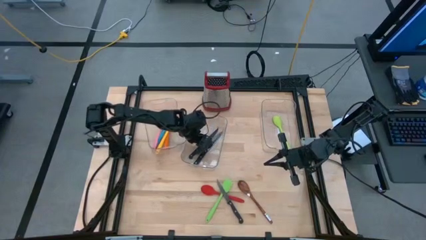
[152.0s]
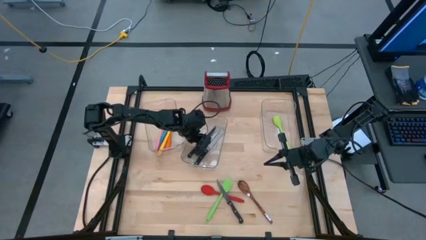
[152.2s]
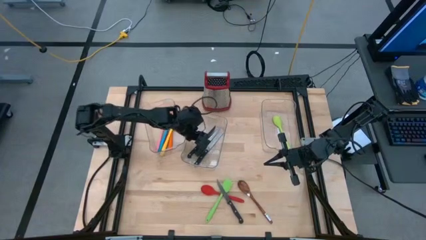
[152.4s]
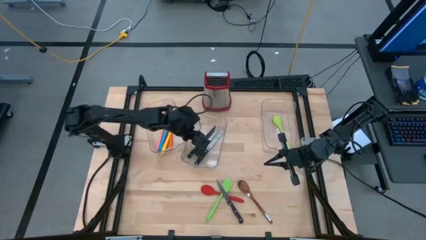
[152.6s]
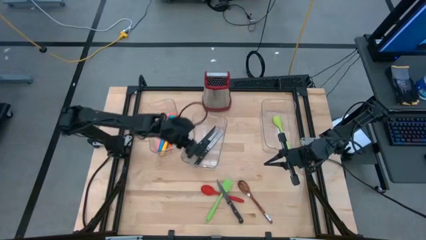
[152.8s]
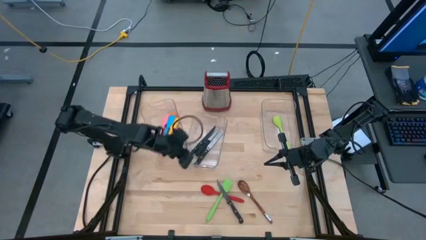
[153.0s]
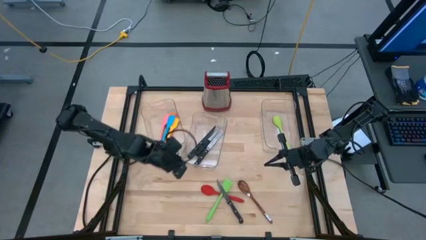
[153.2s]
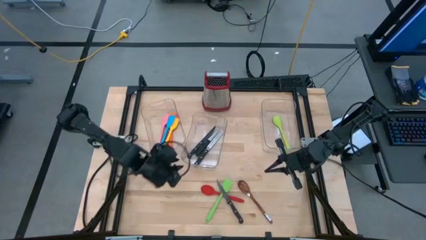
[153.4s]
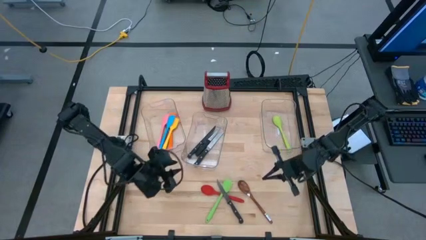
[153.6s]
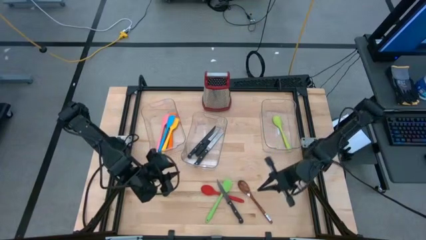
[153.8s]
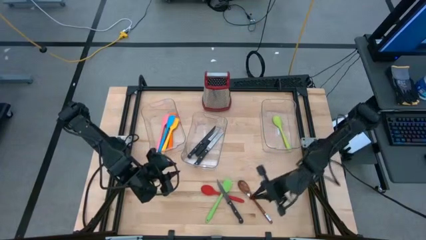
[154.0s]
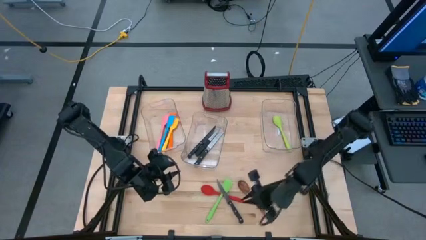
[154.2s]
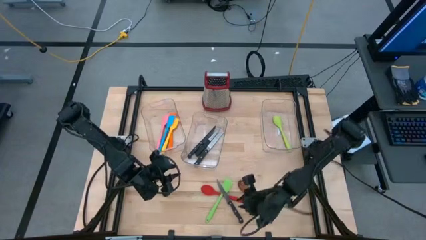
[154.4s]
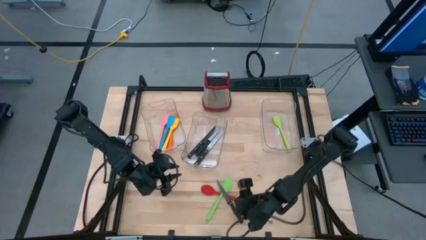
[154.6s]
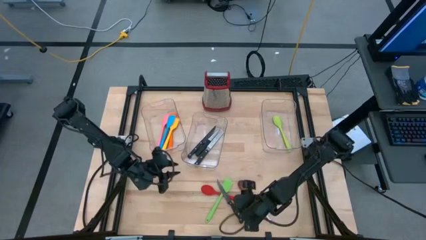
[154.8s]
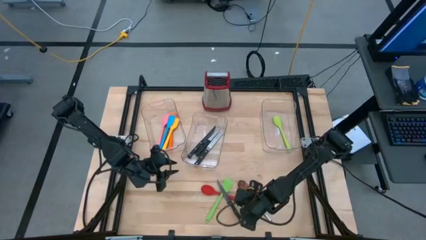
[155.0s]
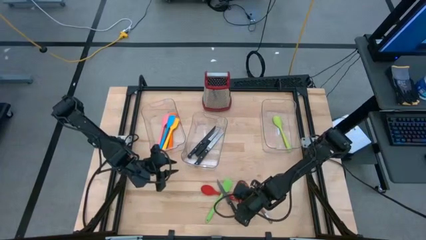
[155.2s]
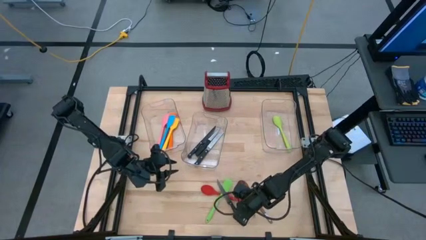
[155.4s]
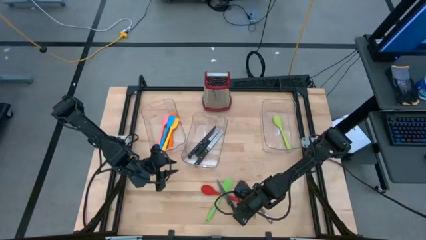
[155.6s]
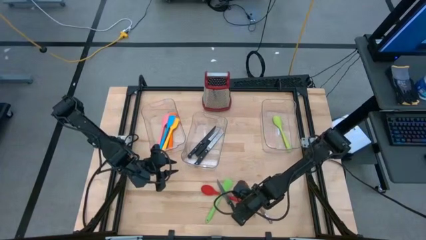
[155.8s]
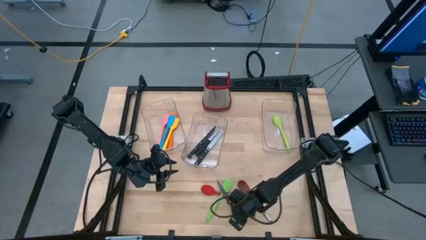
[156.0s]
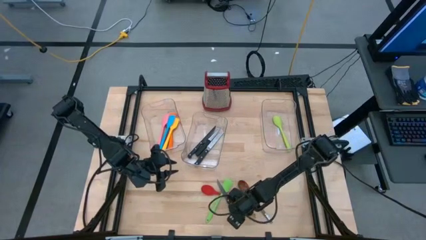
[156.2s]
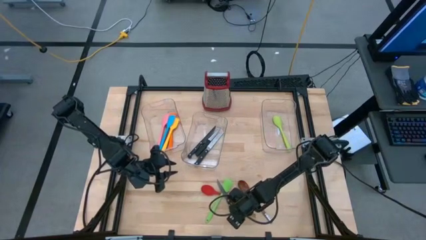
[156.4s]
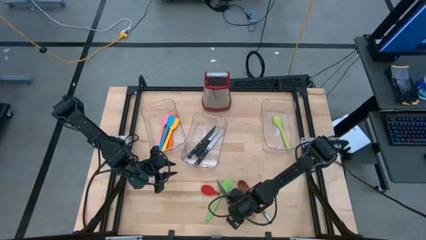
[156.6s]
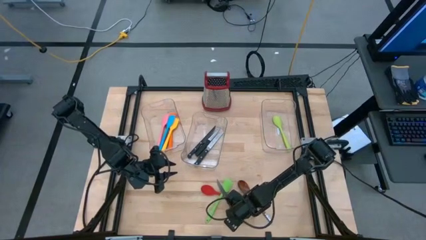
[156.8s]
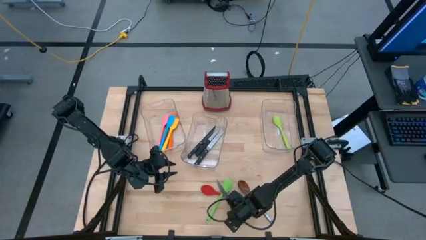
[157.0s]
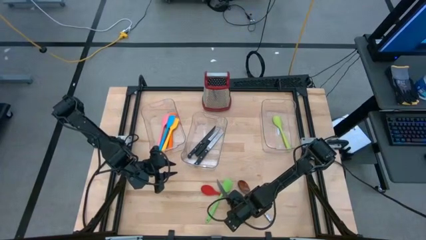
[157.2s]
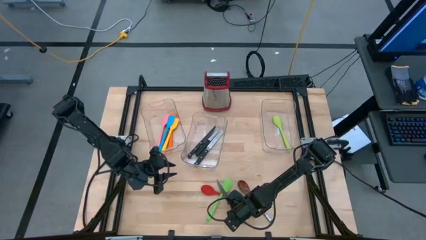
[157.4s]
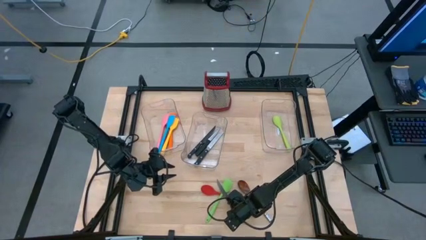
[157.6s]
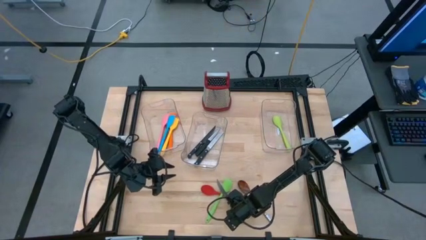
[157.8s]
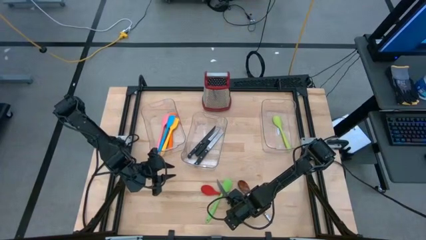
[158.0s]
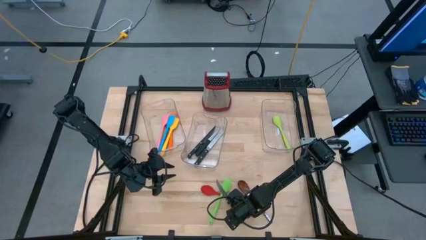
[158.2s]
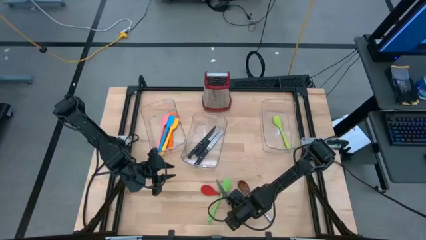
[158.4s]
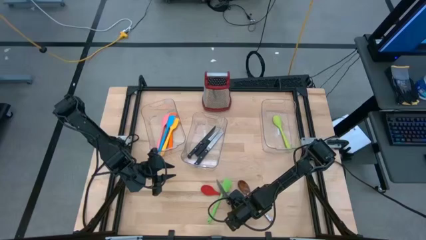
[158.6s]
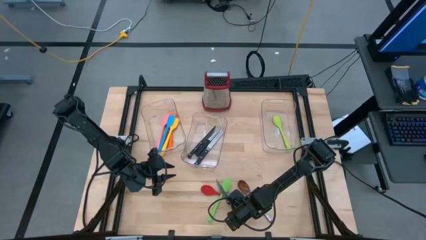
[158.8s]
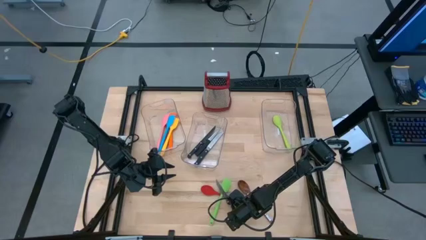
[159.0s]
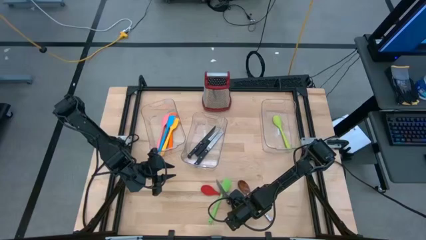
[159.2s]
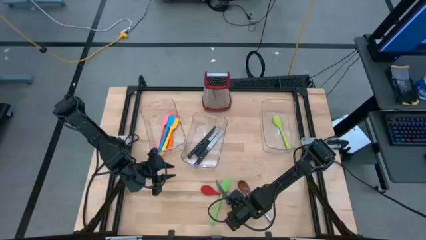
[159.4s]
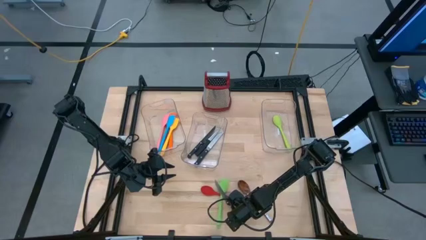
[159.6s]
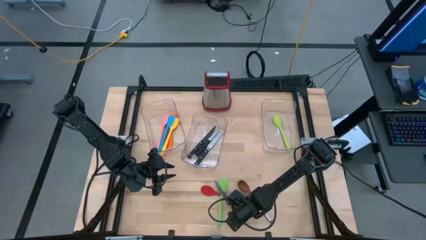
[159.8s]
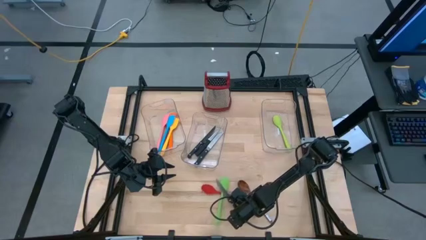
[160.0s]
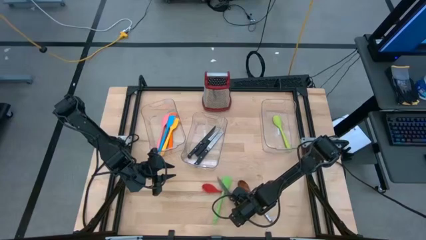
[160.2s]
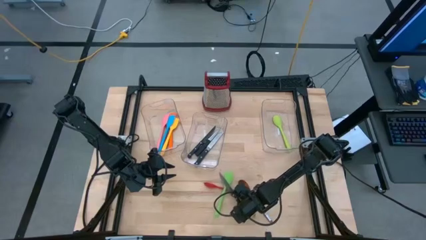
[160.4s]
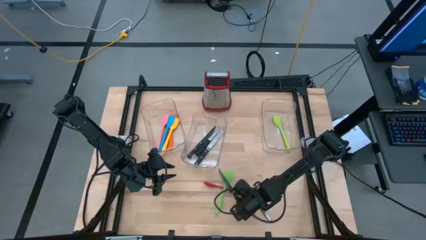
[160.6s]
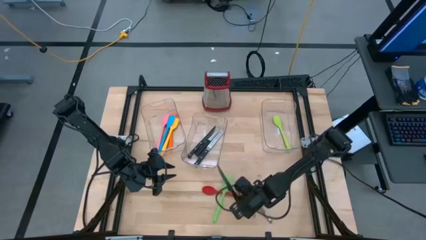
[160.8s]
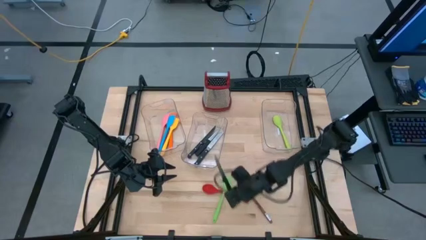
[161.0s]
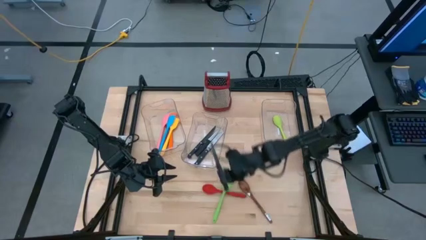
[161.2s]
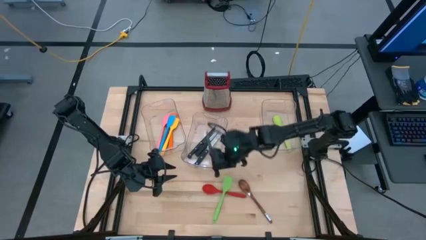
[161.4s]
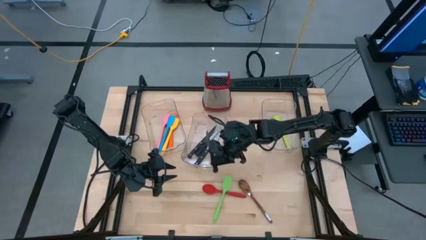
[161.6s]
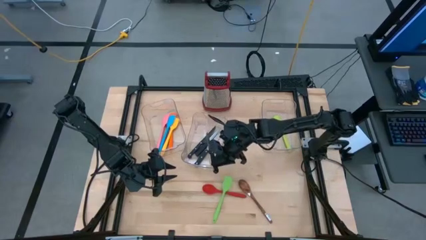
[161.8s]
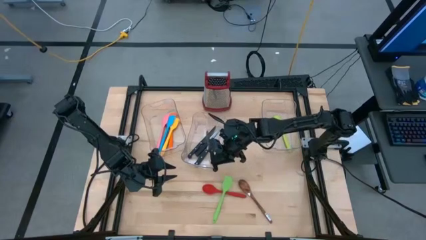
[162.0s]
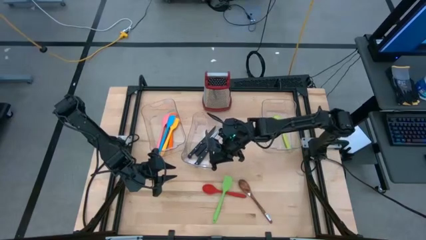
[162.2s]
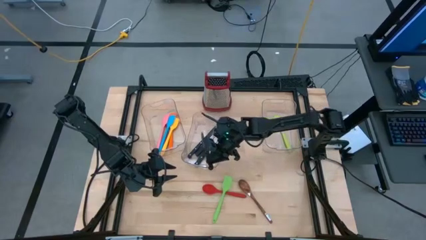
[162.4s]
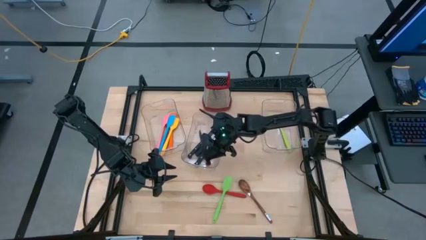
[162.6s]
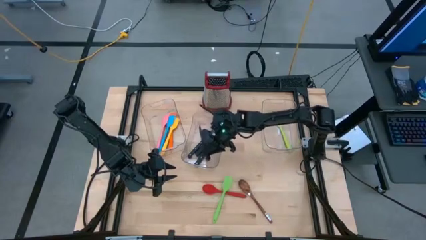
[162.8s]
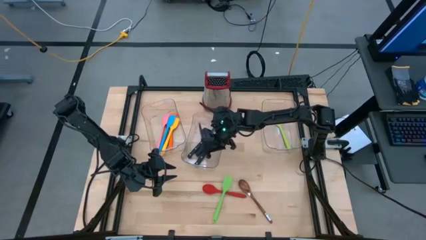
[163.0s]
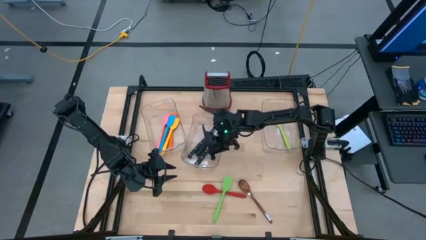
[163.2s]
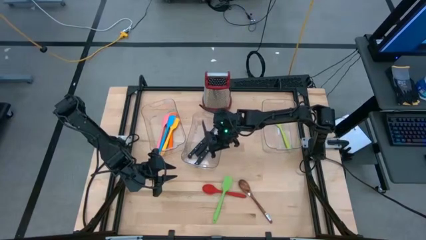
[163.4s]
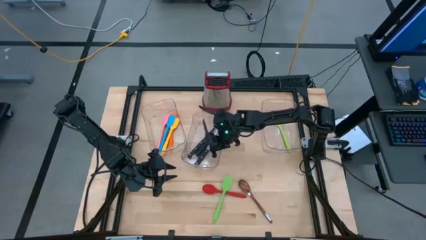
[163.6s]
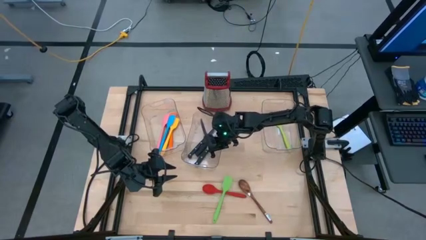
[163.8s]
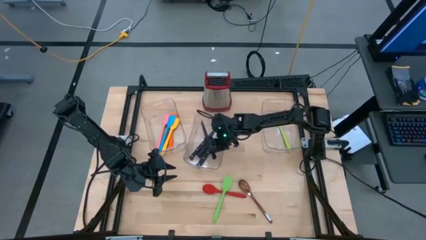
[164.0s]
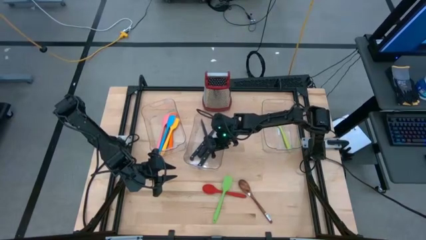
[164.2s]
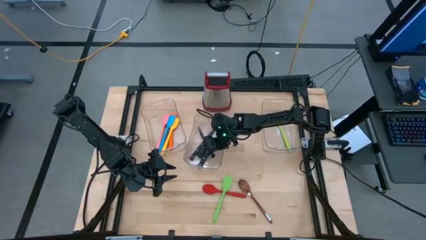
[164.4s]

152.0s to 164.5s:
Task: Pick & Place Kitchen Items
Put the black knife into the middle transparent bin
